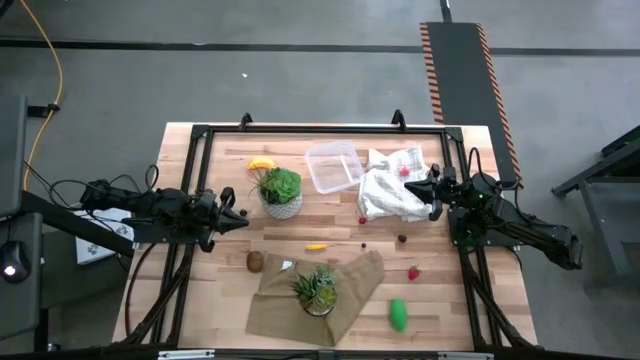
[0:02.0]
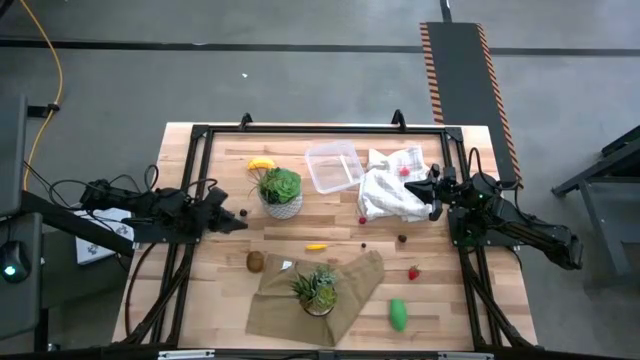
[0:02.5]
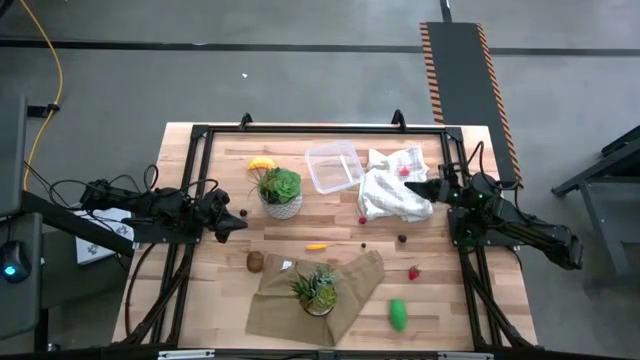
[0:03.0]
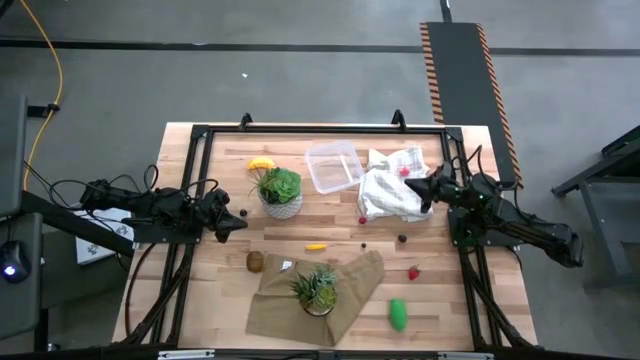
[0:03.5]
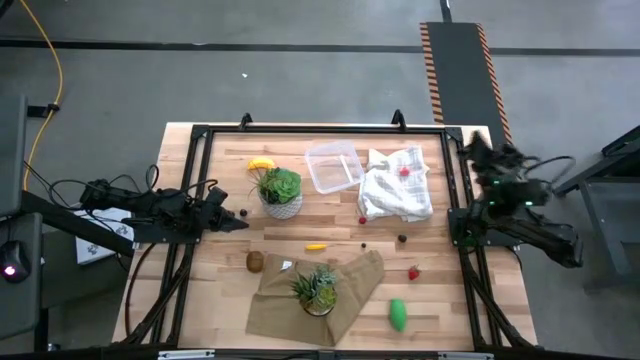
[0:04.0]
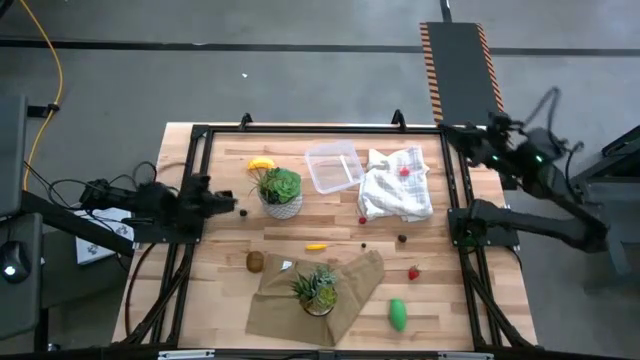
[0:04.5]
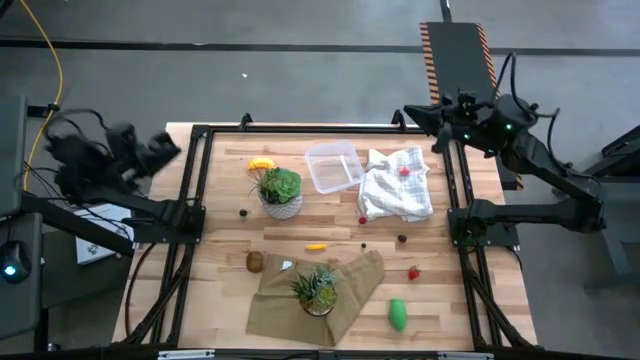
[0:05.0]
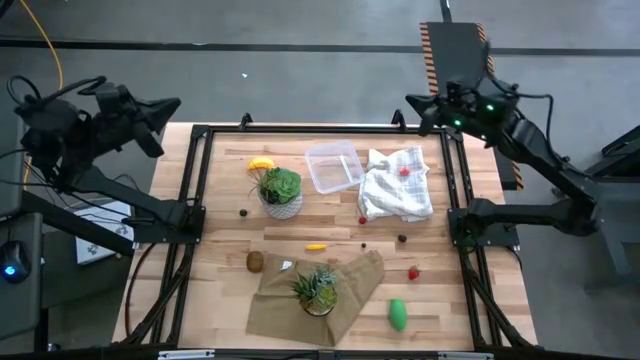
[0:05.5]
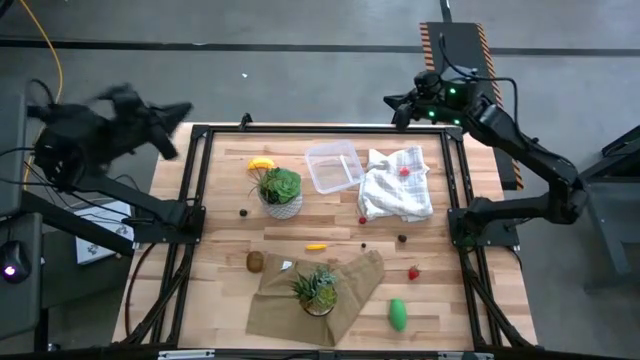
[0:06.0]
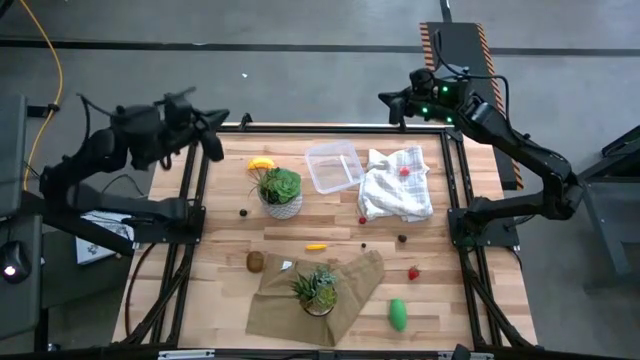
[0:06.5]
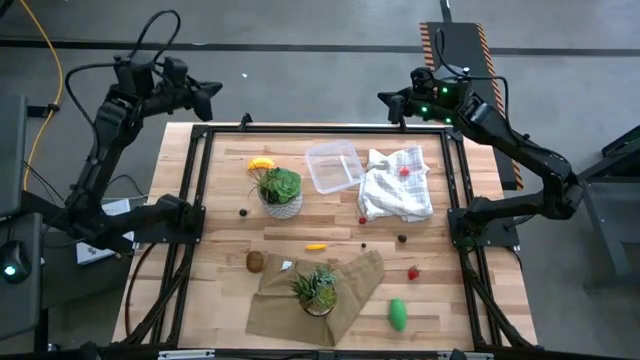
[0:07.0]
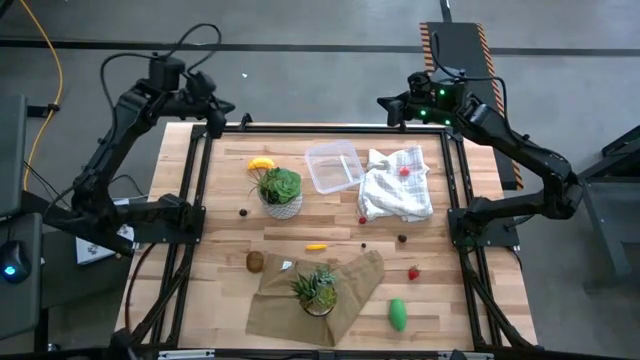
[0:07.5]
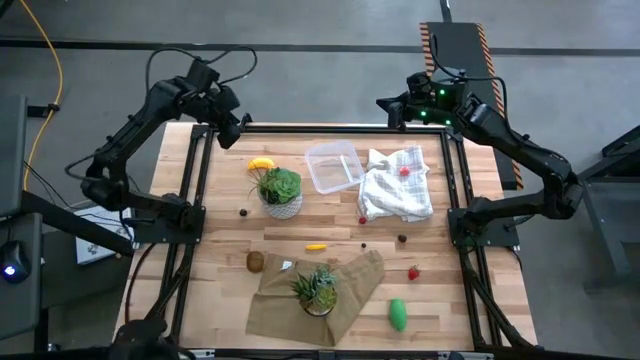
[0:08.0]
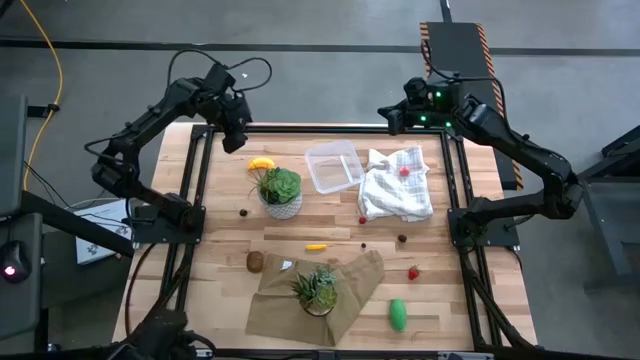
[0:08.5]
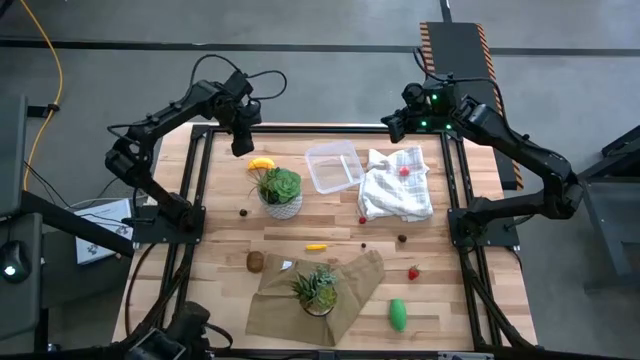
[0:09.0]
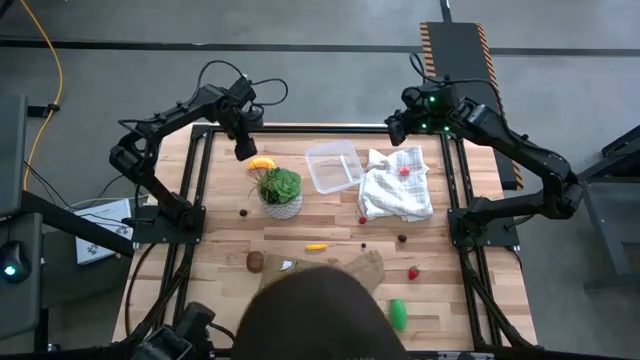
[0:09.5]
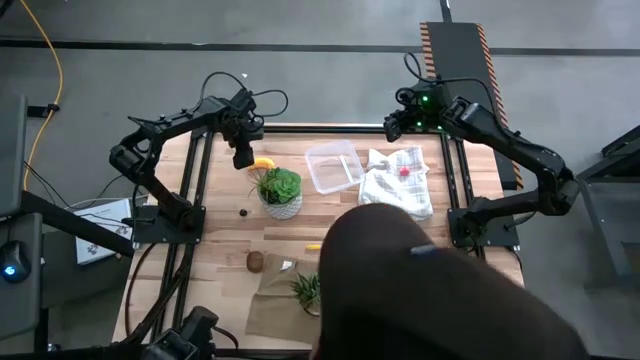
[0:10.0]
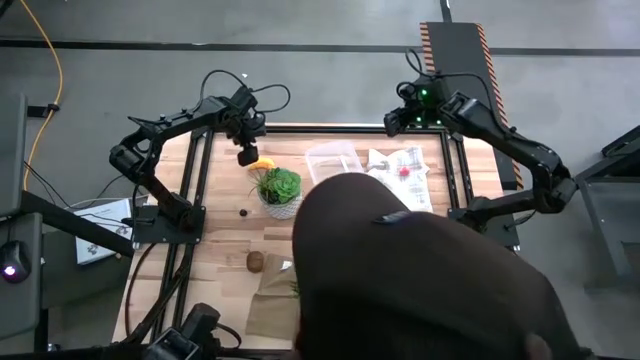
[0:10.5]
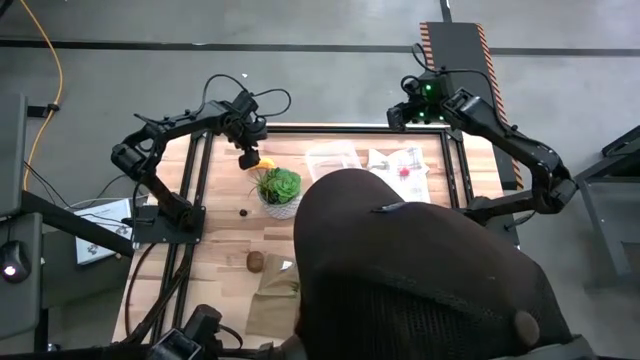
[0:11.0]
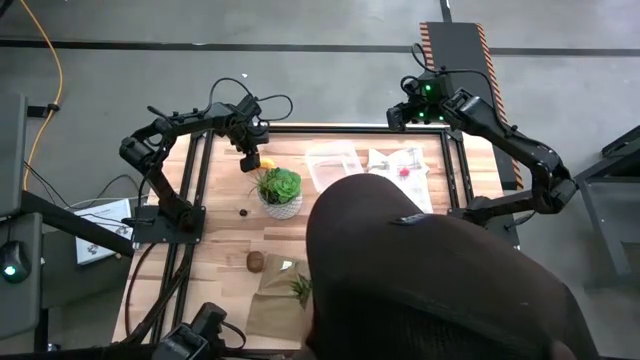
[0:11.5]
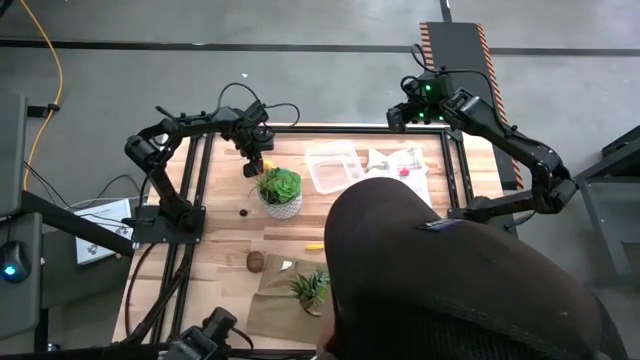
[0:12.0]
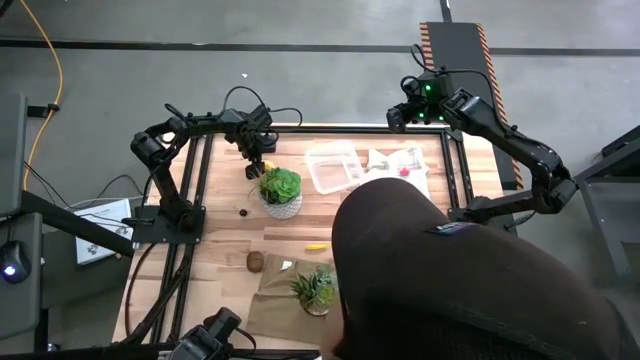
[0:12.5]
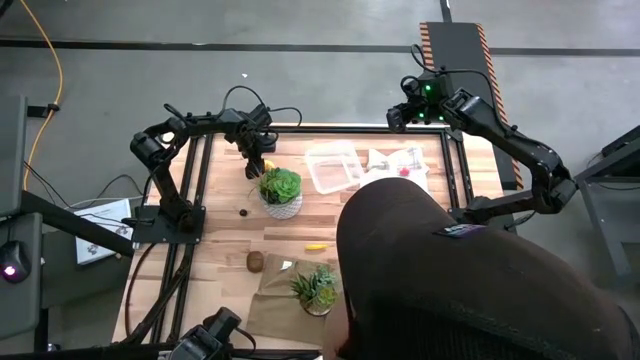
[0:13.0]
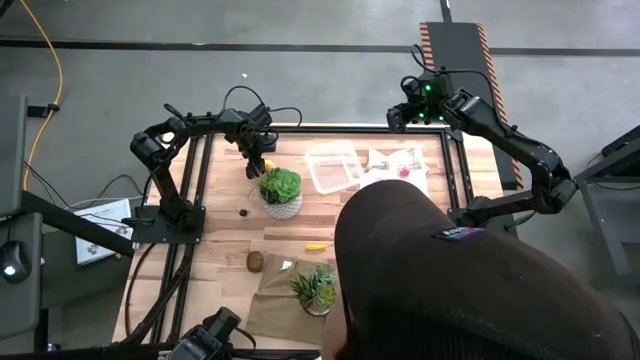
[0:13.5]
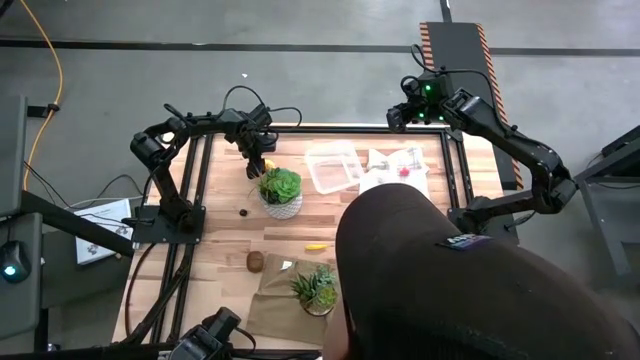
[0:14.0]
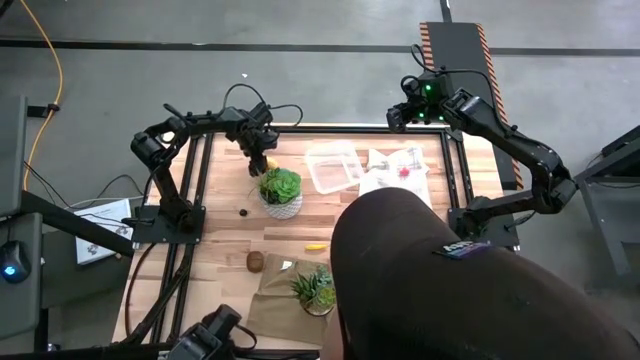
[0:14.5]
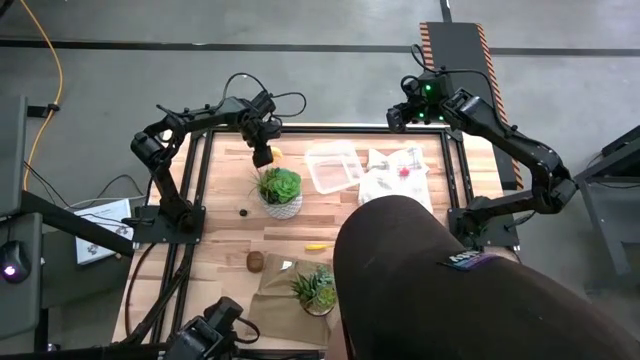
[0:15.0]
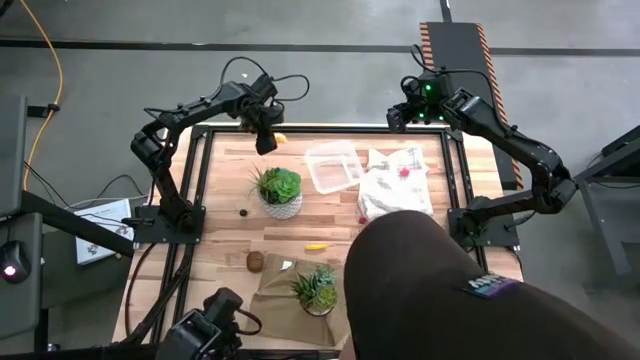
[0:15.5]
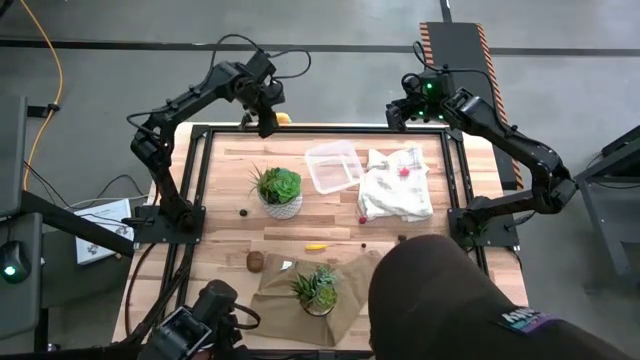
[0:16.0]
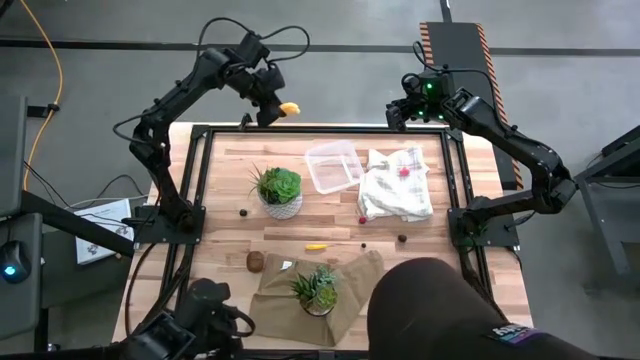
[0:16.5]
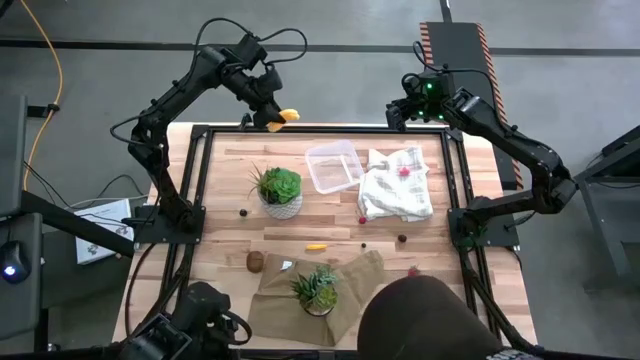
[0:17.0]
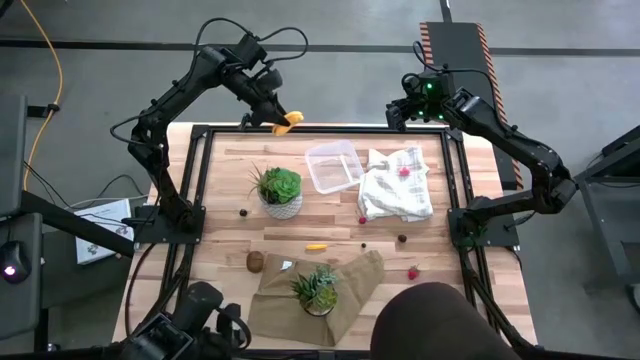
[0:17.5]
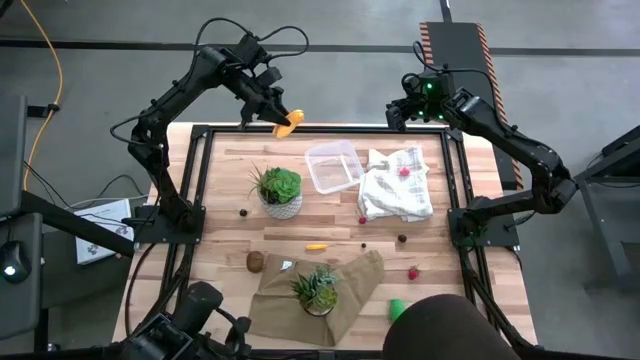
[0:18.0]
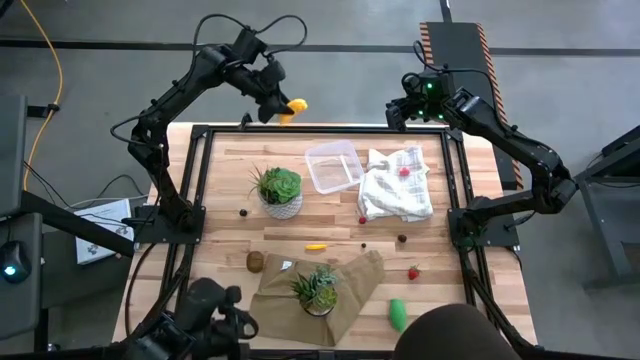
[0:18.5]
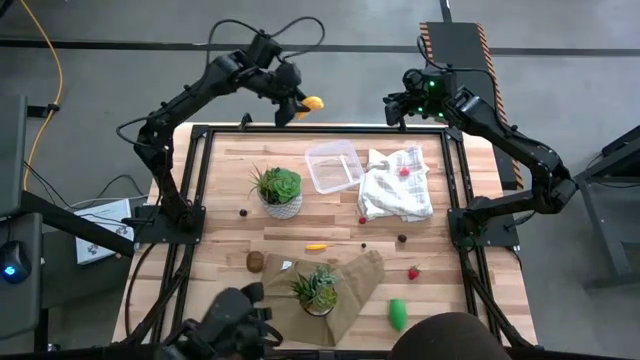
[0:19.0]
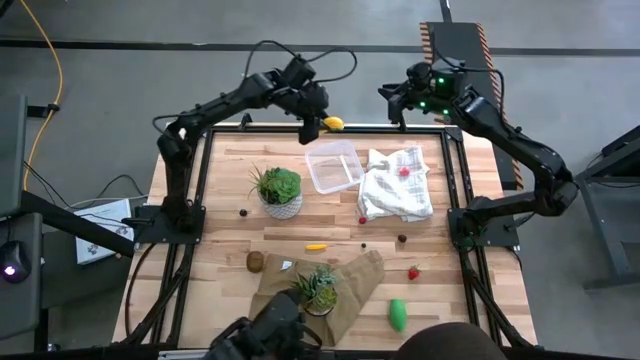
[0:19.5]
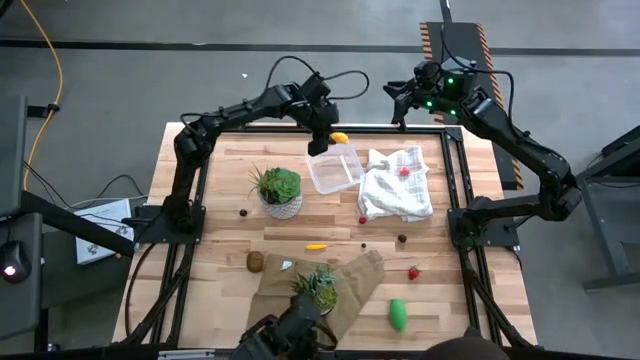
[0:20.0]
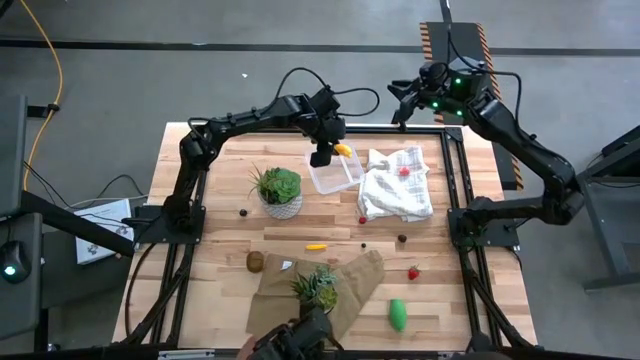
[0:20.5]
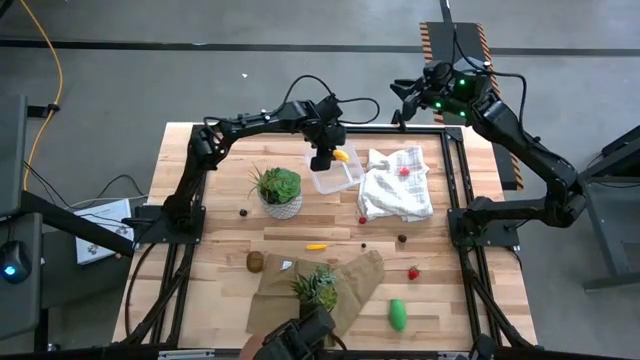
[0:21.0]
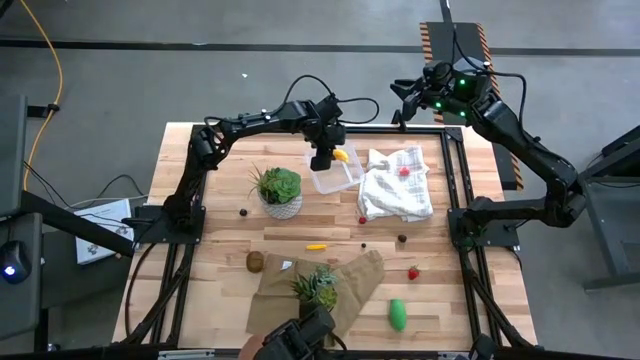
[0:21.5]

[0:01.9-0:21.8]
Task: Pick and placing Produce into tupperware
Put the yellow banana into the transparent bin
